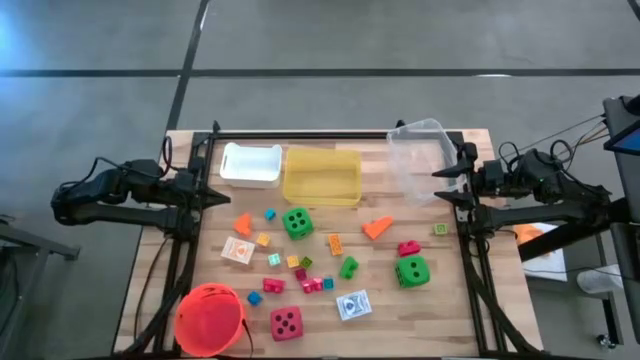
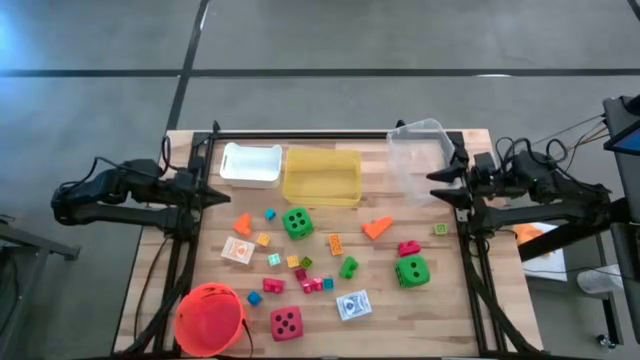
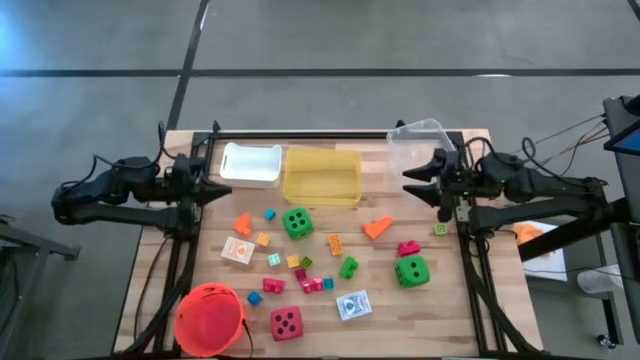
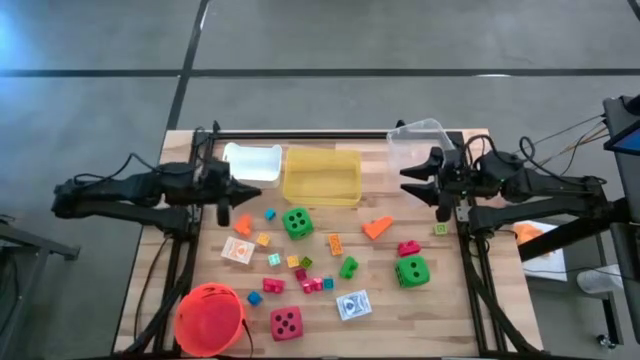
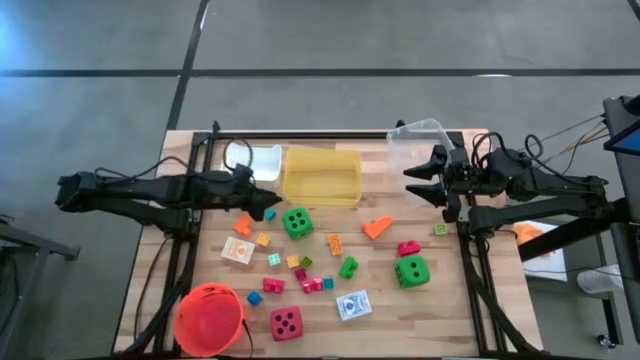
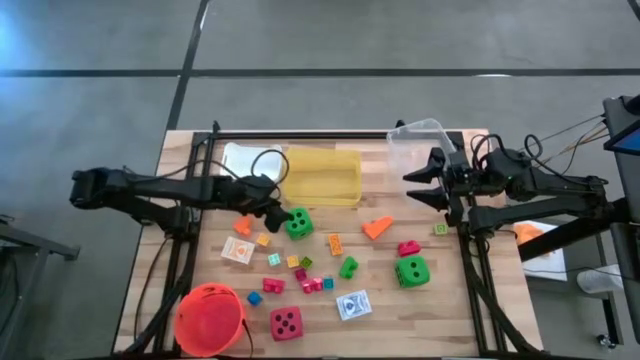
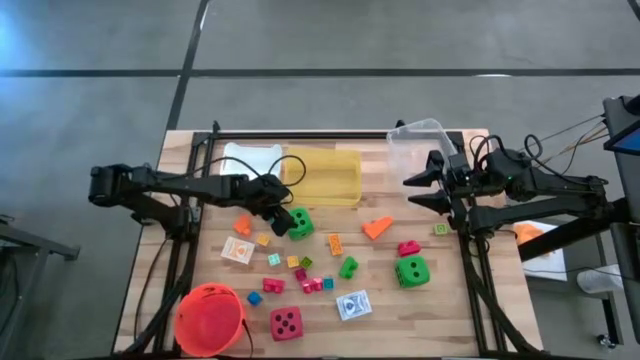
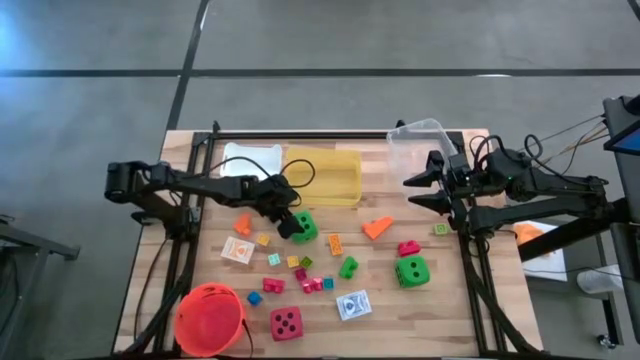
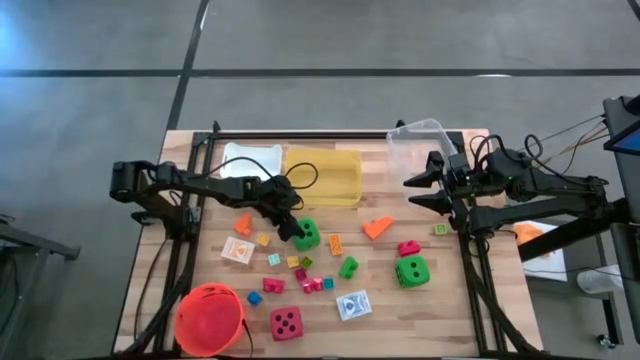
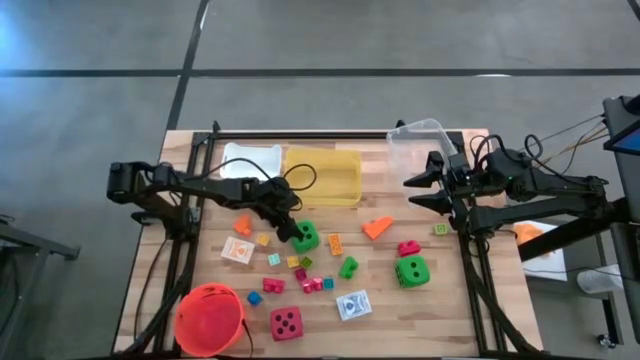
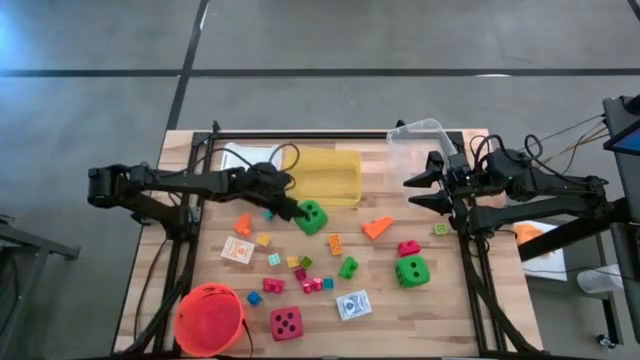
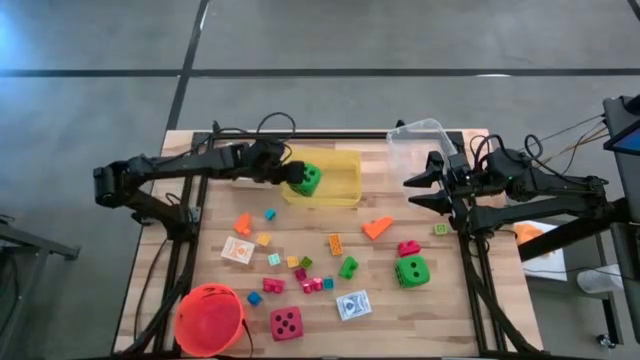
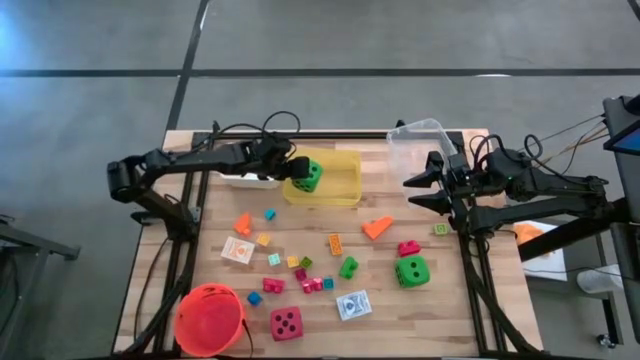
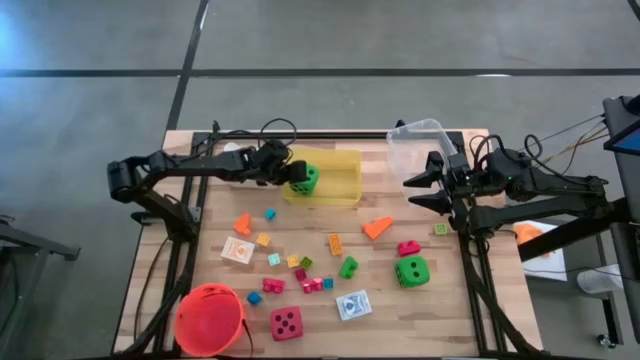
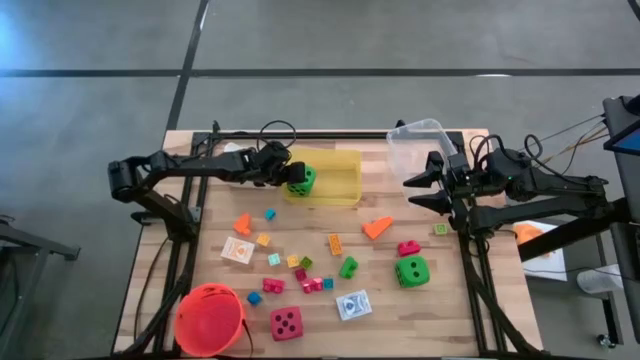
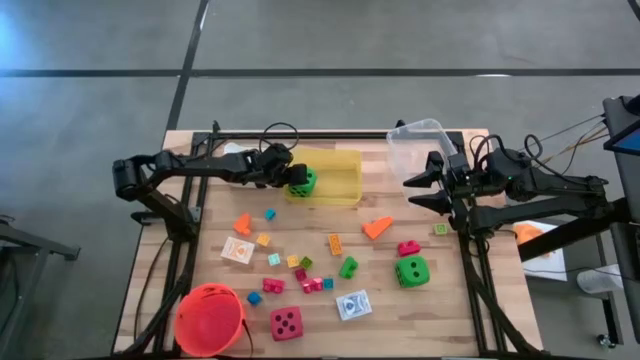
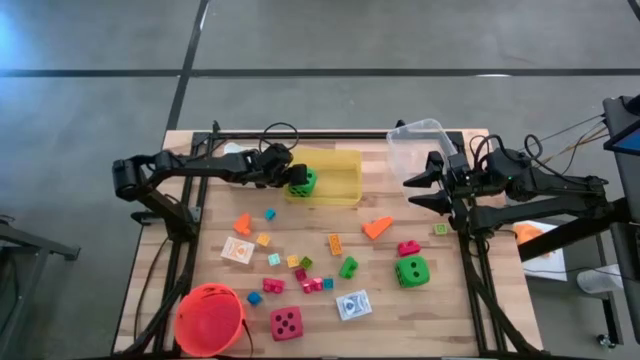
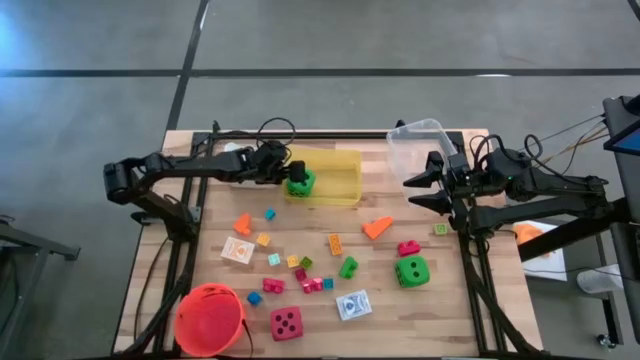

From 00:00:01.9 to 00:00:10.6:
Task: Pick & Place Toys
Put the top green dice into the yellow bin

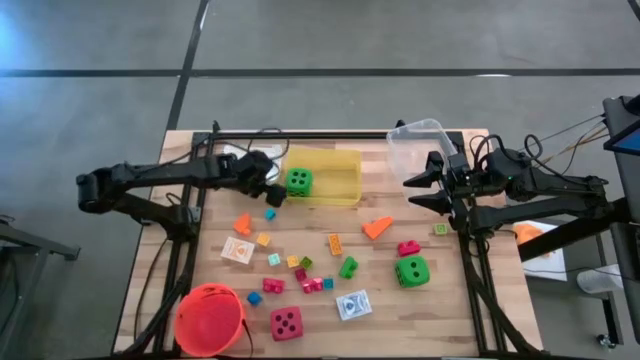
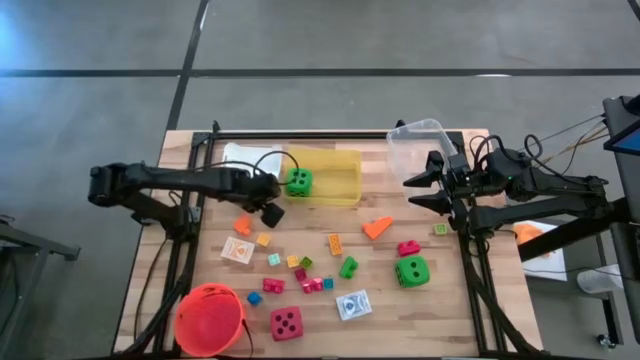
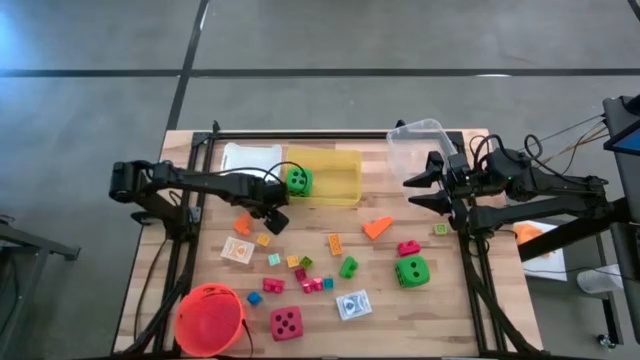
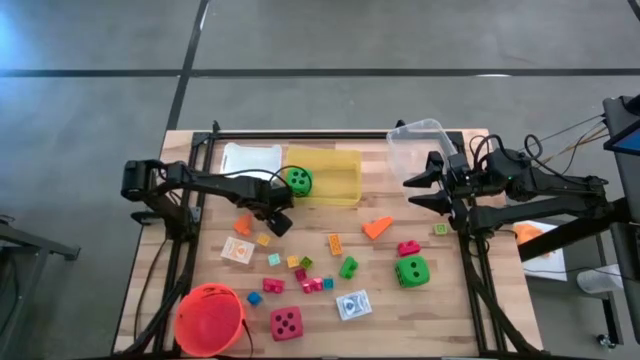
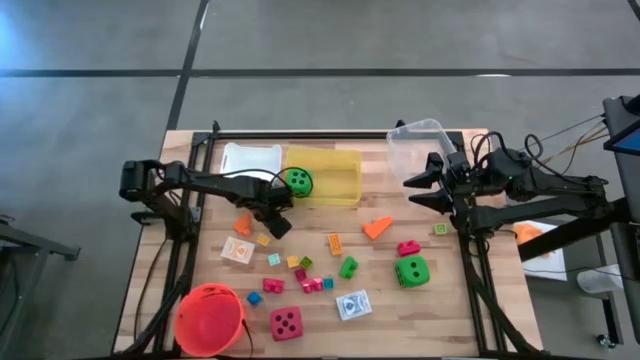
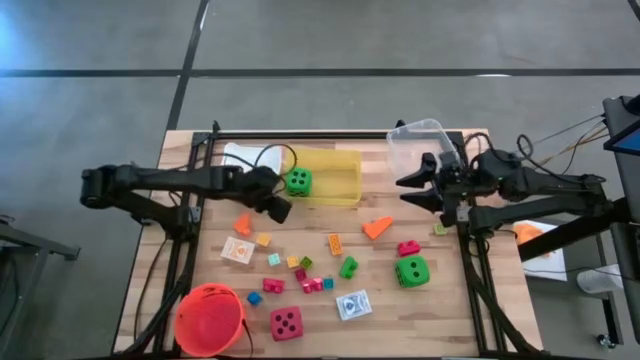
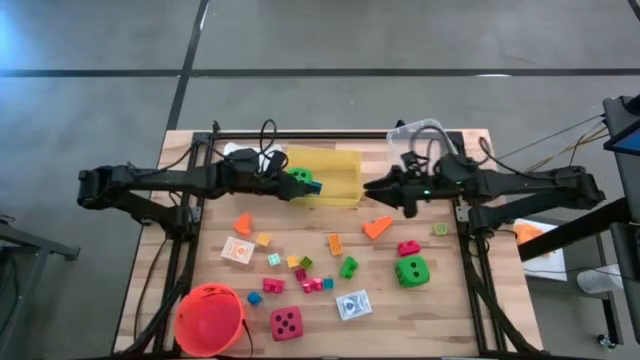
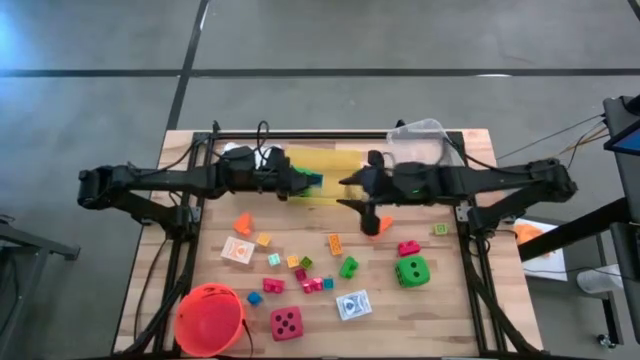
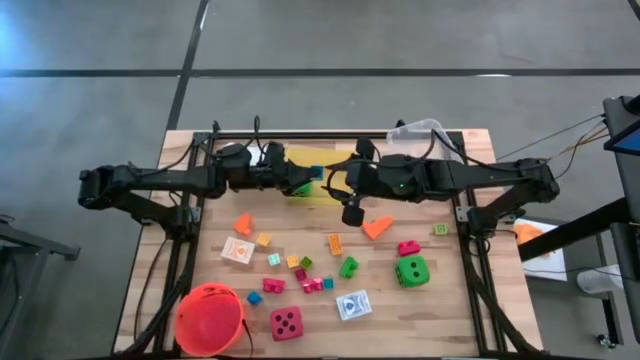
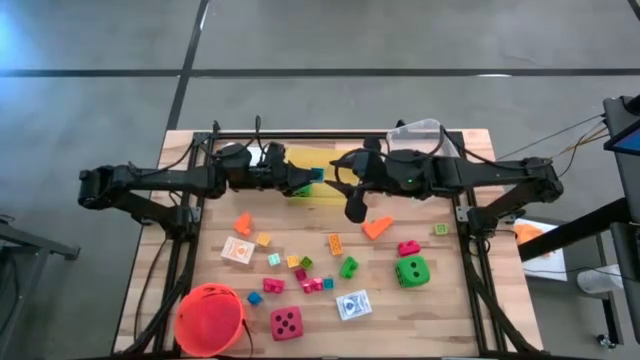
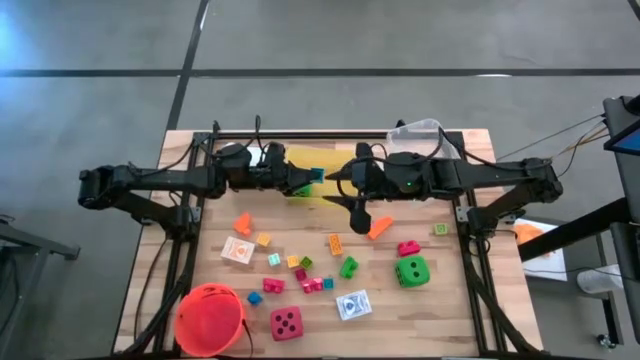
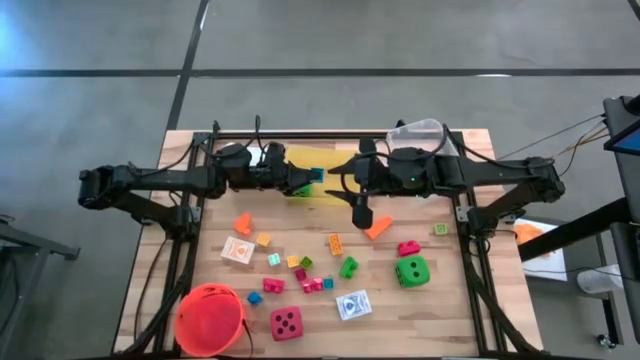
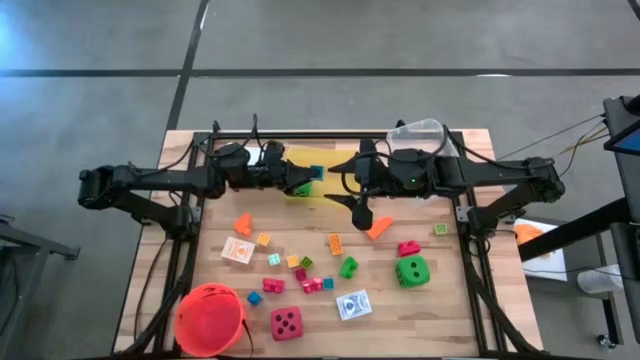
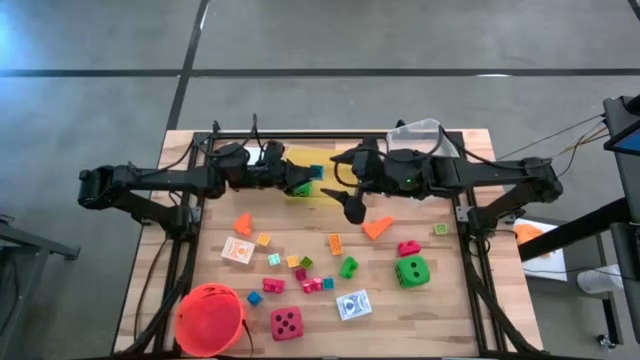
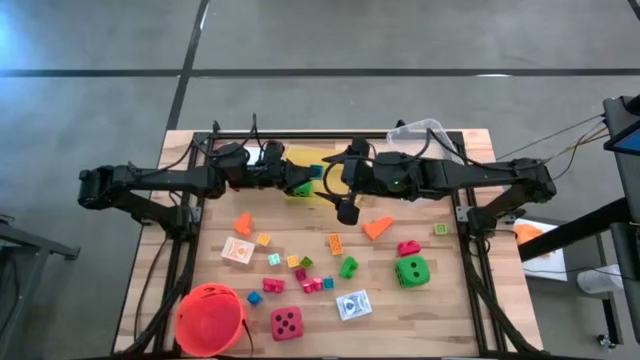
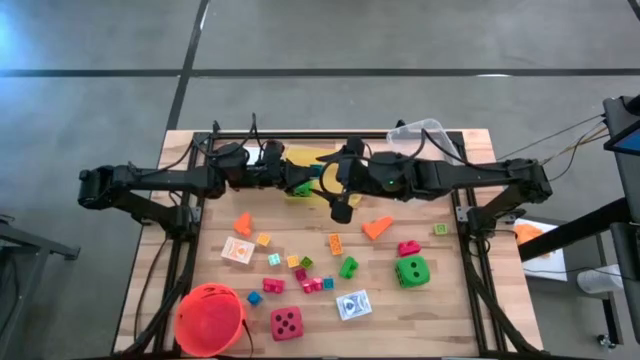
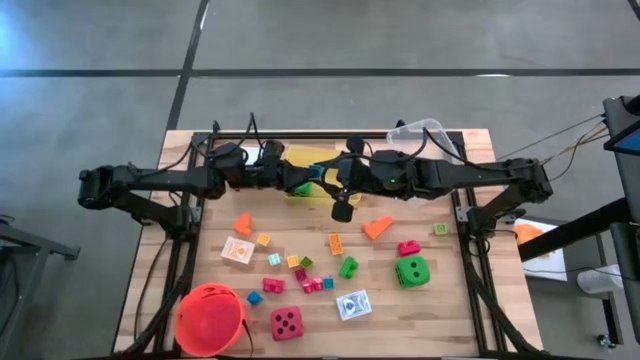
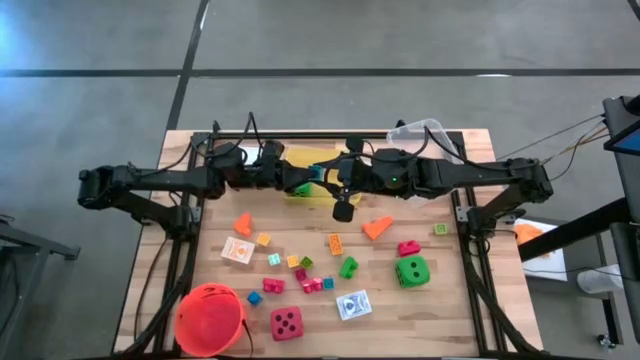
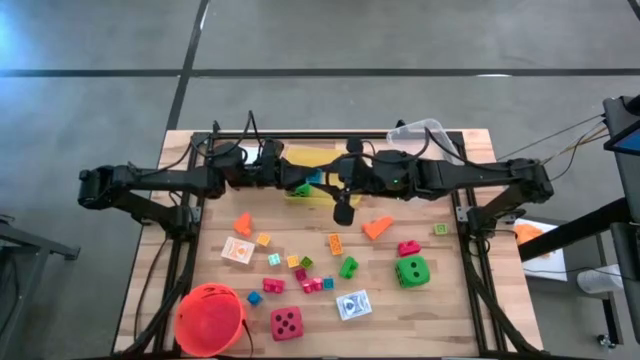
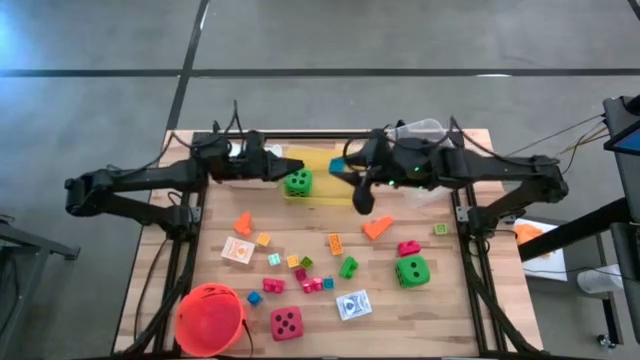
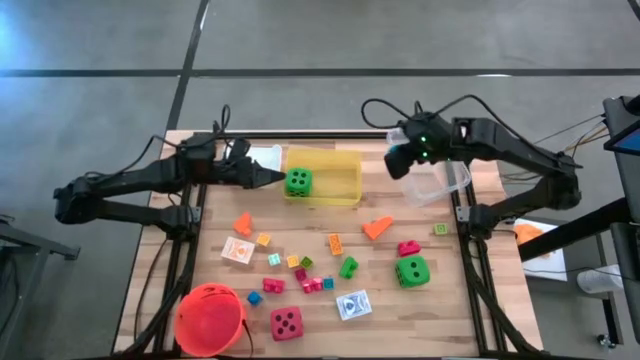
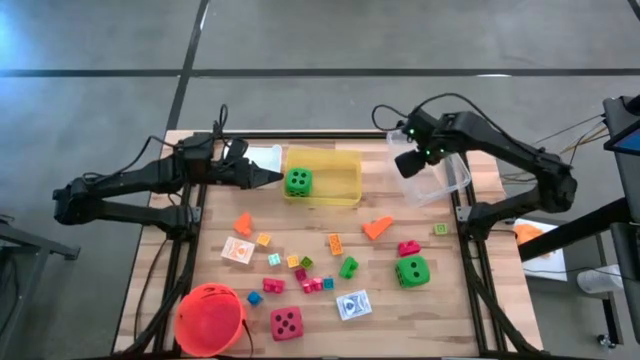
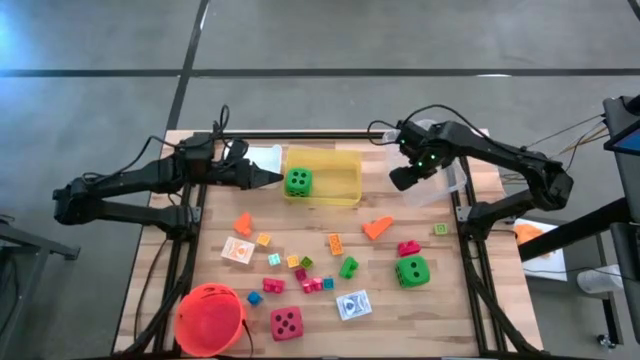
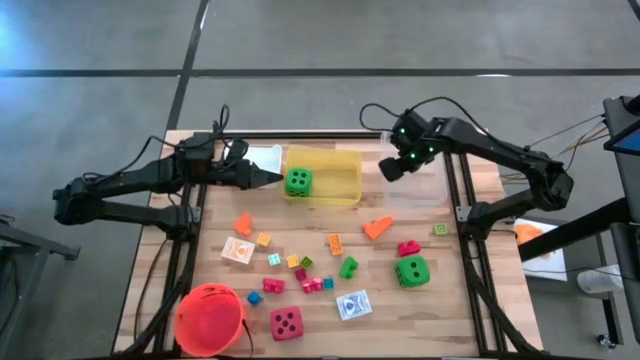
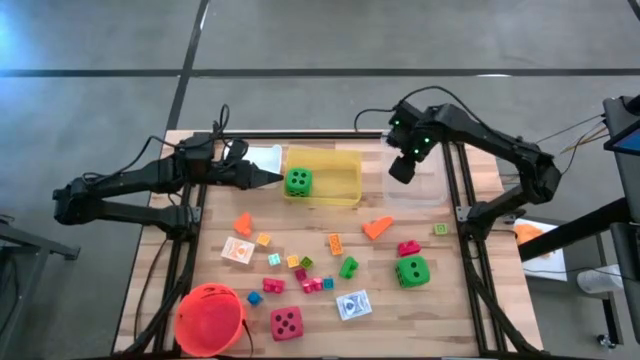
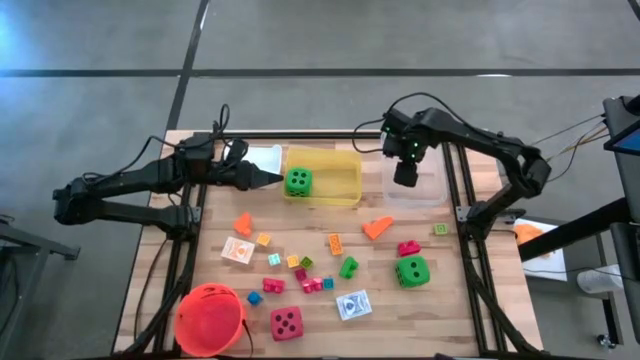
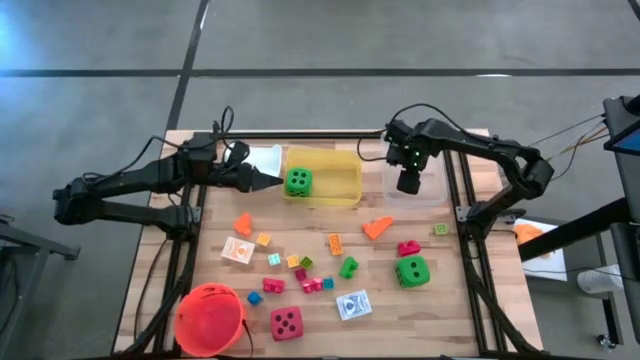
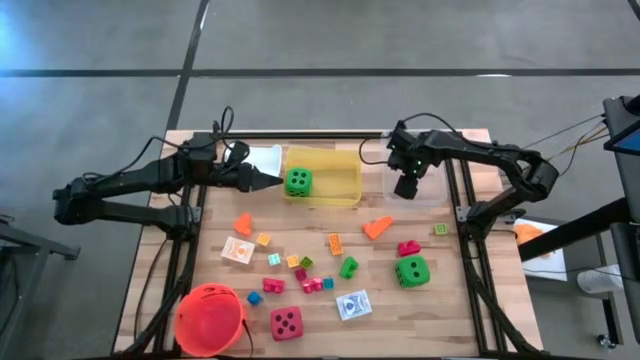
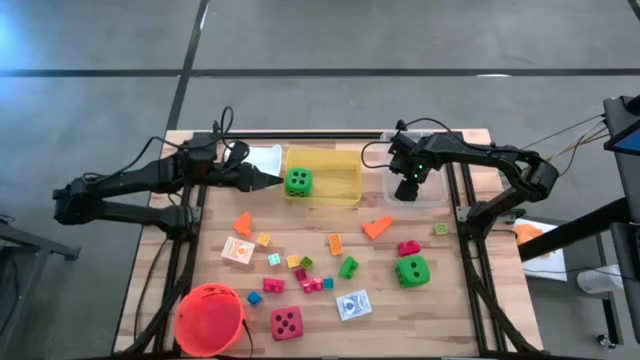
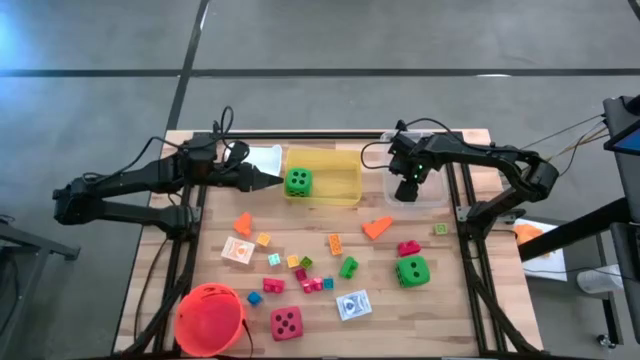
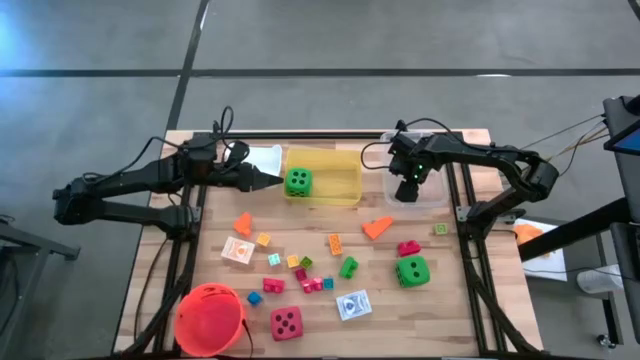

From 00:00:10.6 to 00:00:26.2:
Put the top blue game piece into the transparent bin
